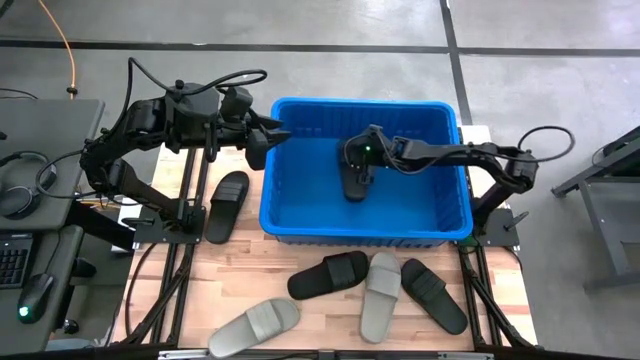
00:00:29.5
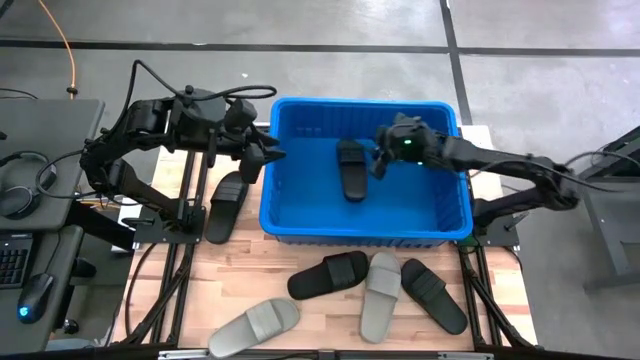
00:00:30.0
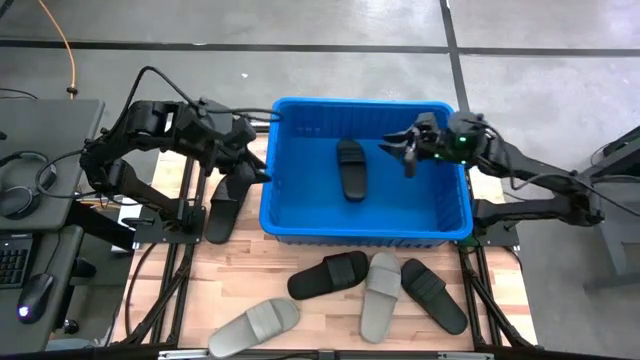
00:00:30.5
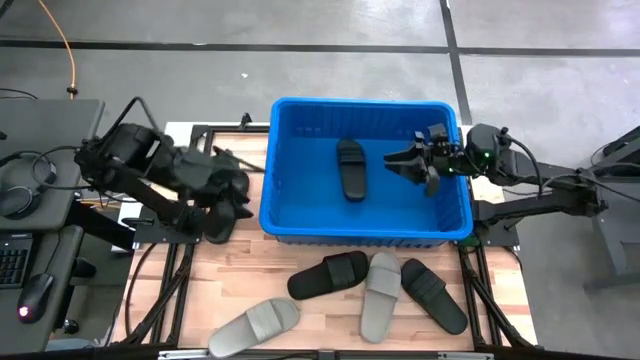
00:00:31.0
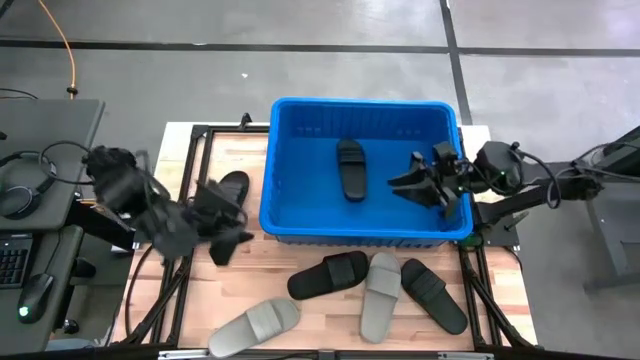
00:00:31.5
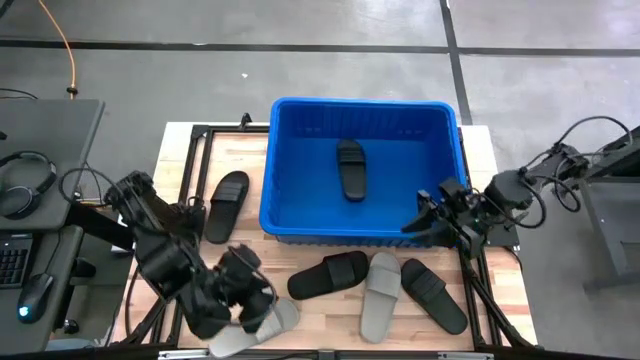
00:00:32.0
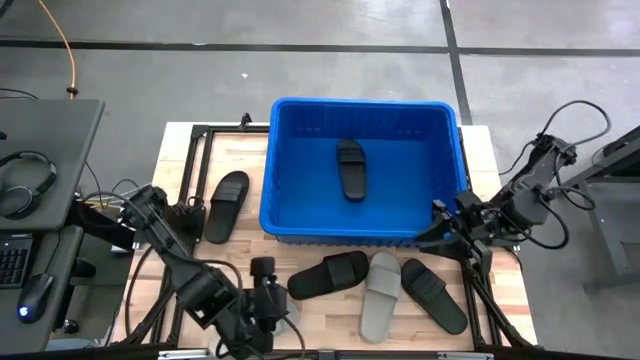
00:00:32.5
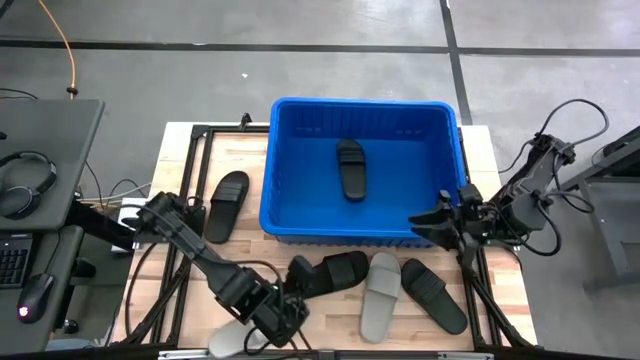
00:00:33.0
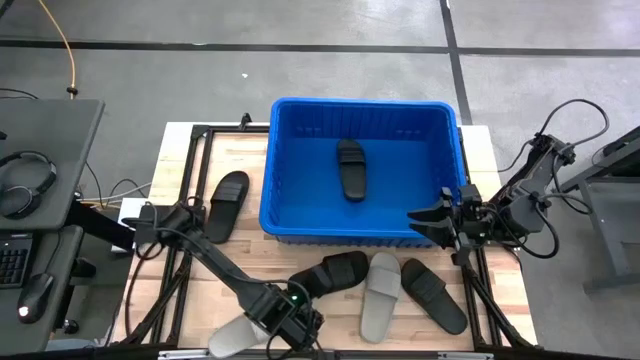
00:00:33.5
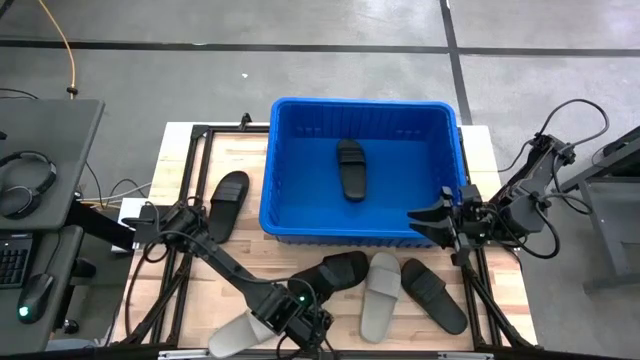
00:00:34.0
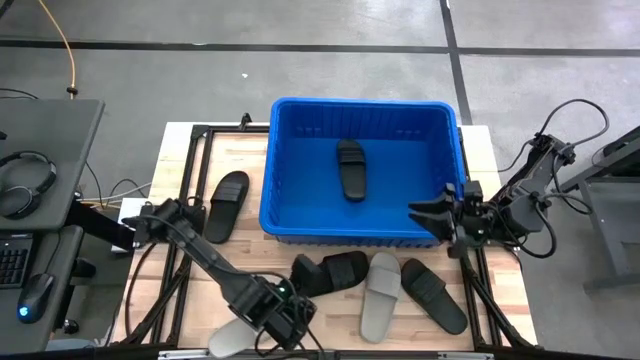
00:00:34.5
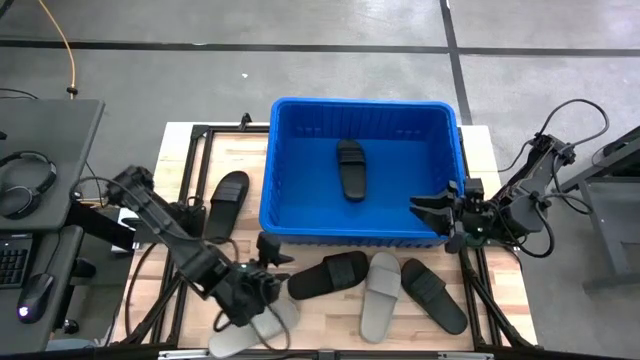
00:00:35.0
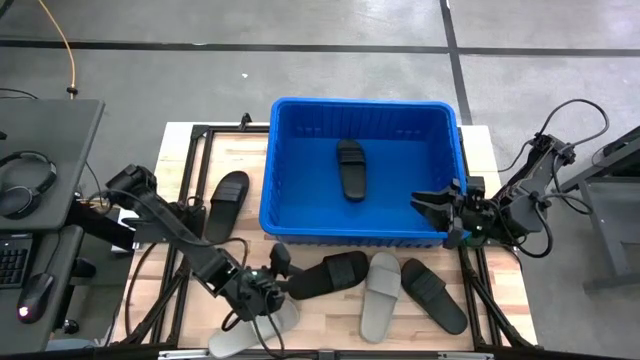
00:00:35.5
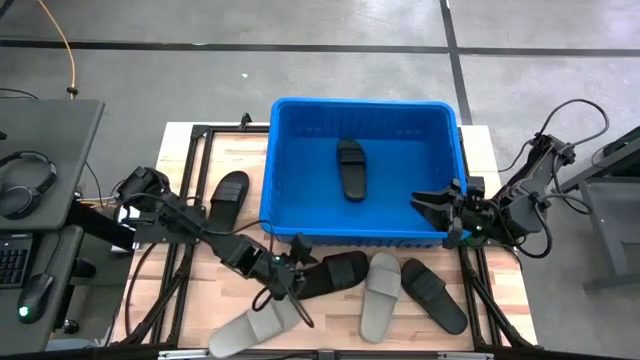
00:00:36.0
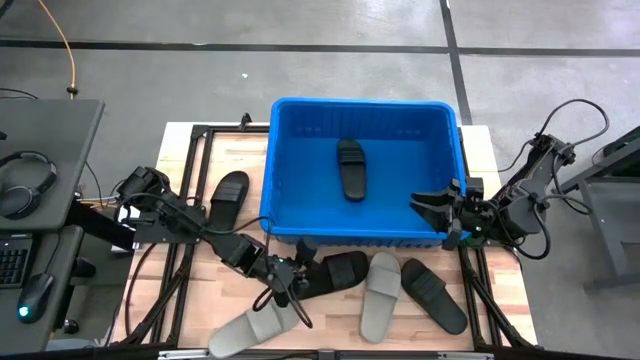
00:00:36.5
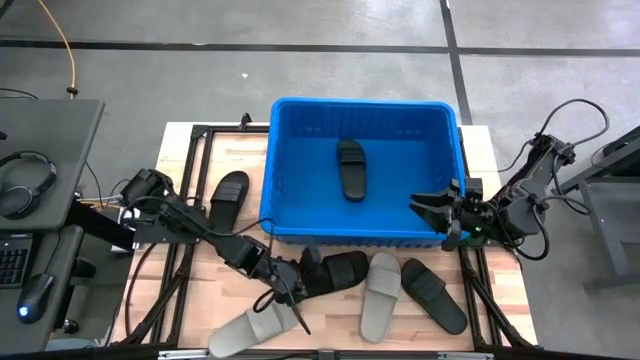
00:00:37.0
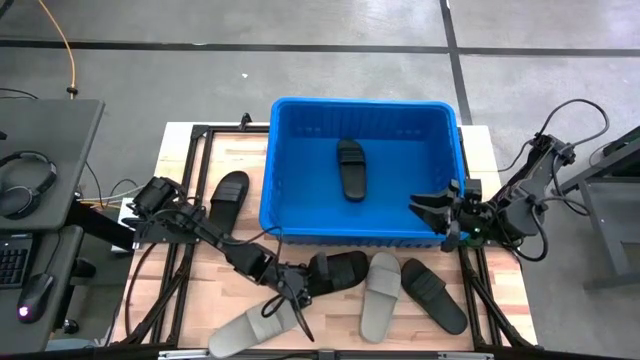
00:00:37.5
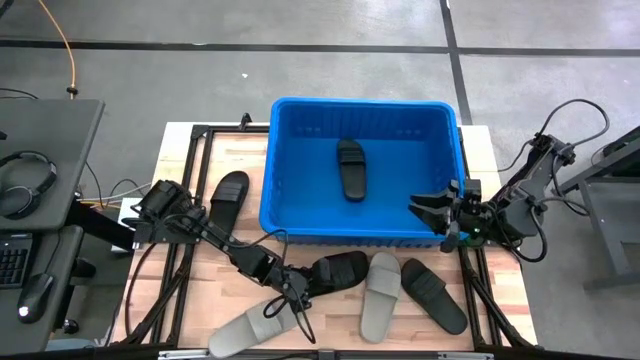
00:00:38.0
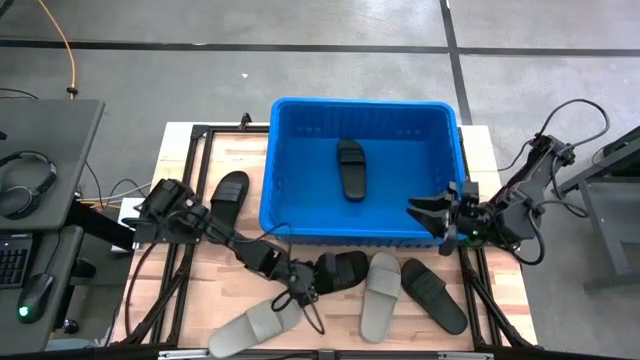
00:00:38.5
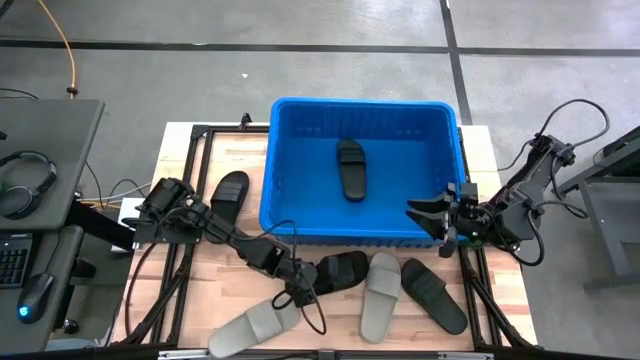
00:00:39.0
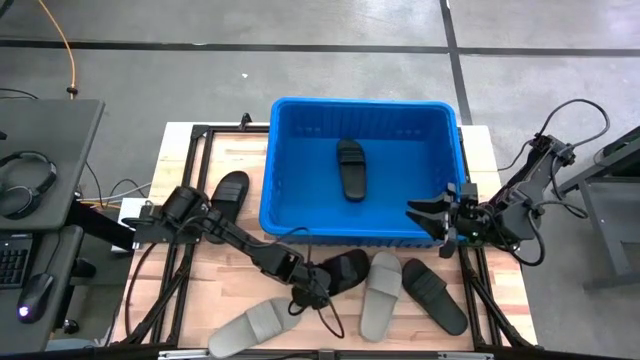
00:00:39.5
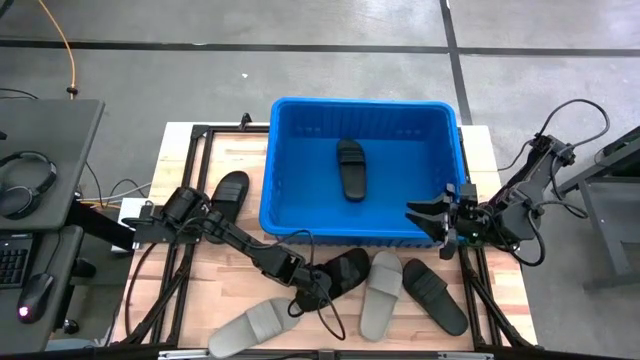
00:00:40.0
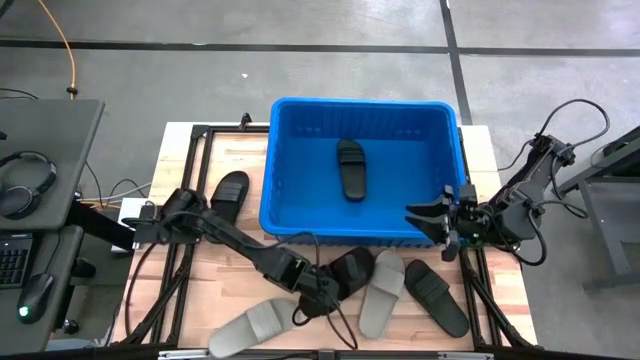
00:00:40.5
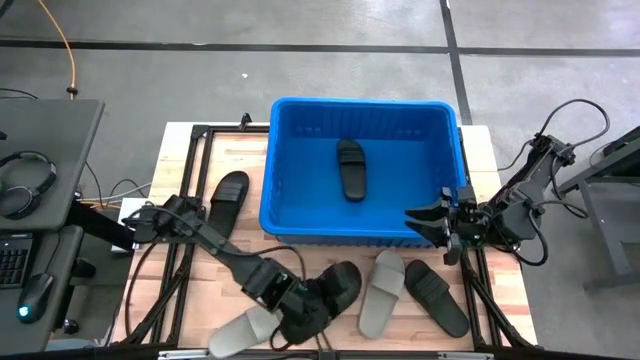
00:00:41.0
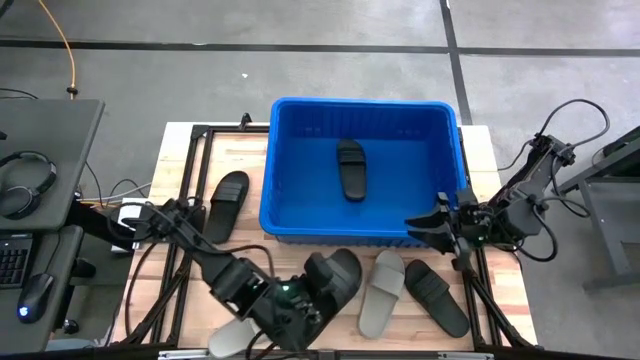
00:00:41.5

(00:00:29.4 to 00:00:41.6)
Task: Pick and place slides into bin
Put the black slides on top of the black slides into the blue bin

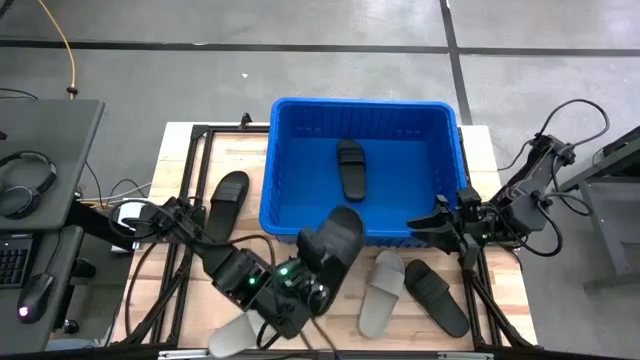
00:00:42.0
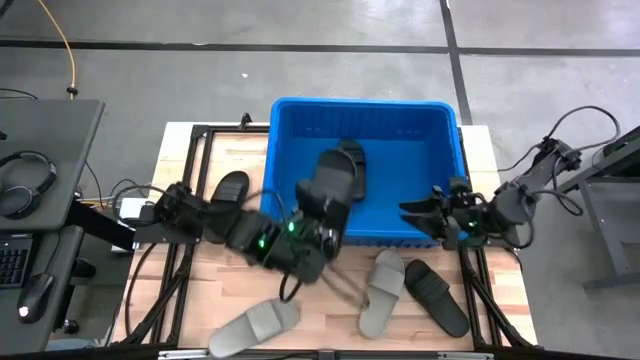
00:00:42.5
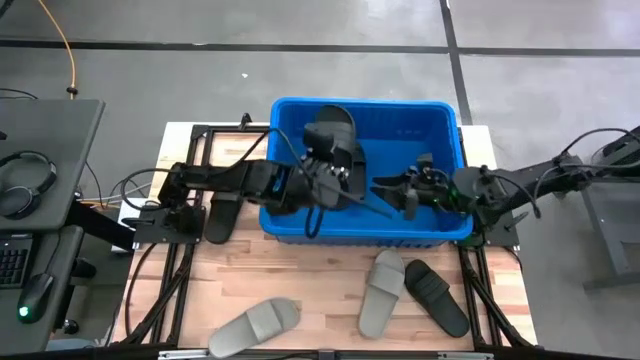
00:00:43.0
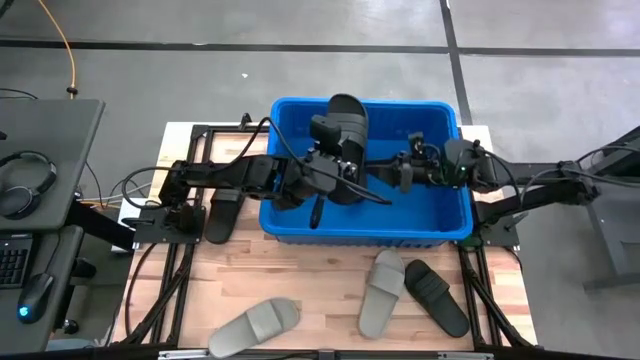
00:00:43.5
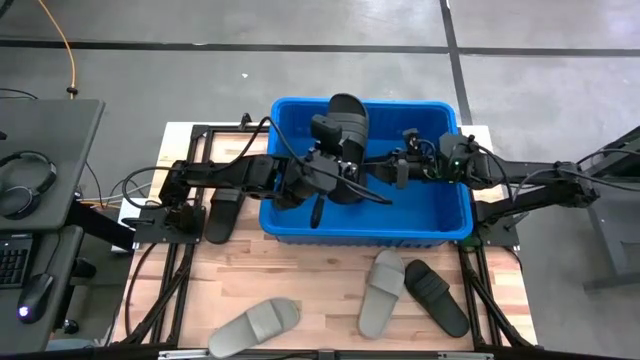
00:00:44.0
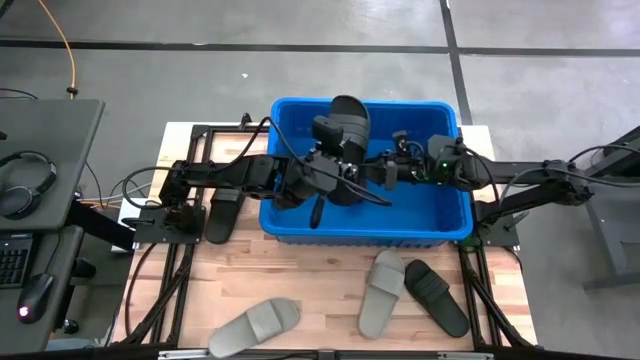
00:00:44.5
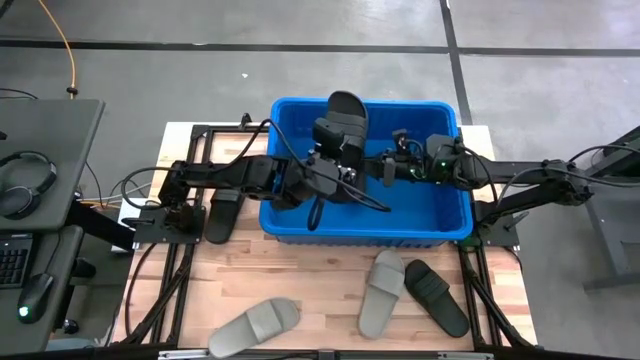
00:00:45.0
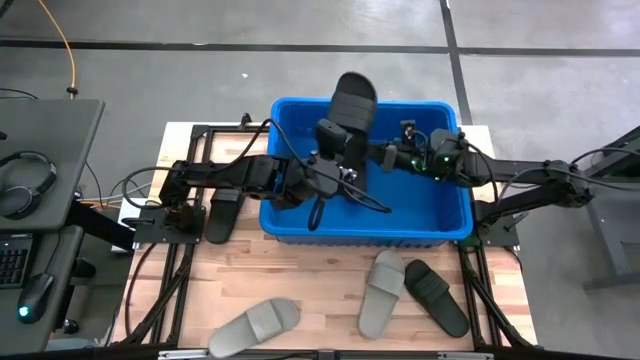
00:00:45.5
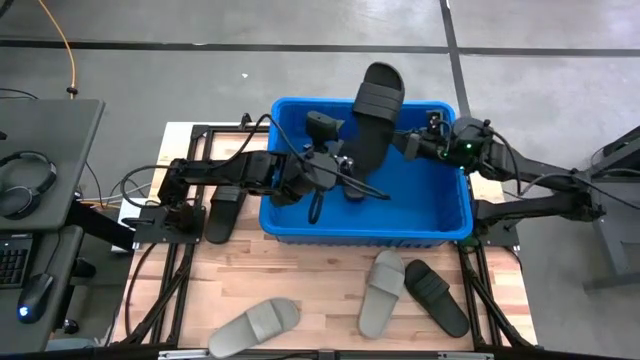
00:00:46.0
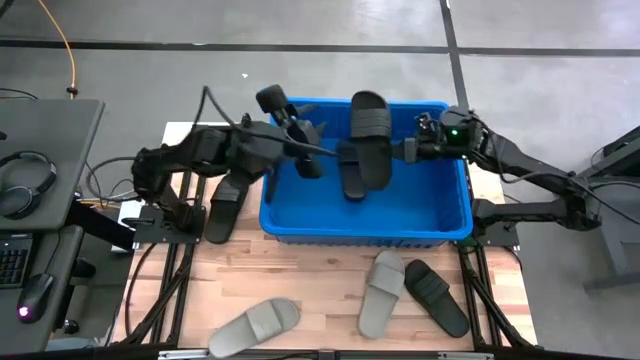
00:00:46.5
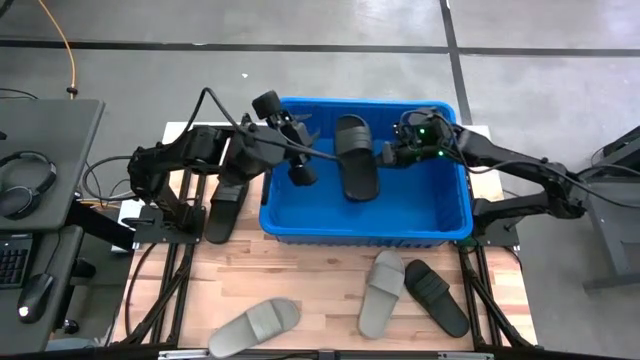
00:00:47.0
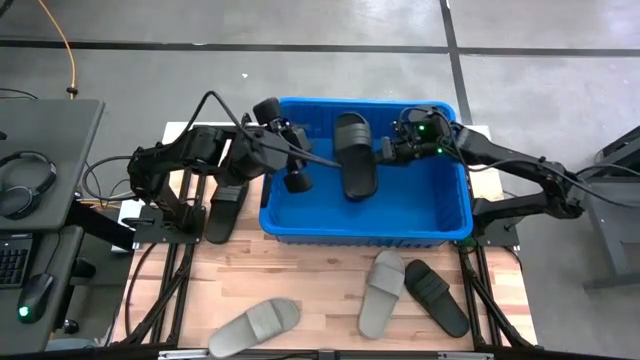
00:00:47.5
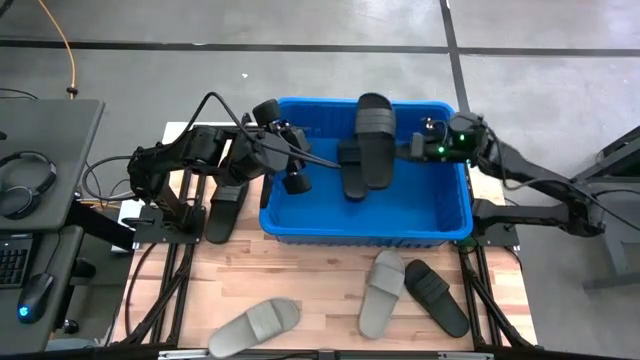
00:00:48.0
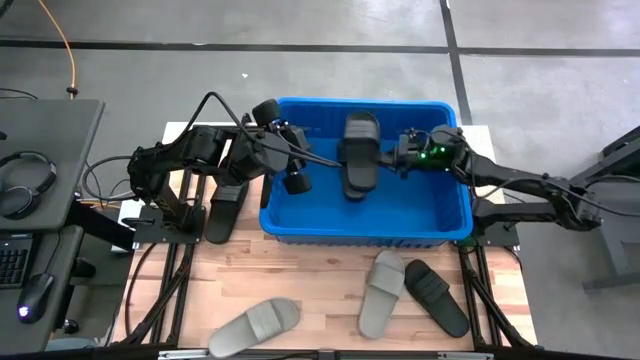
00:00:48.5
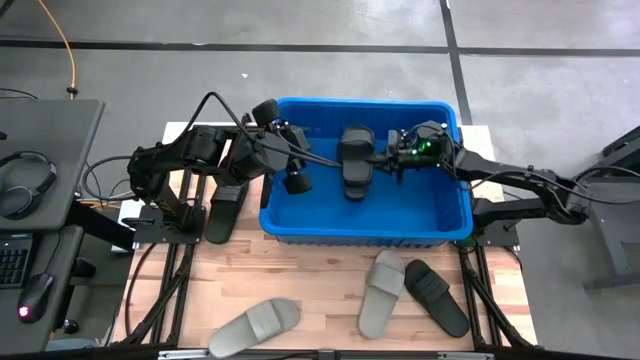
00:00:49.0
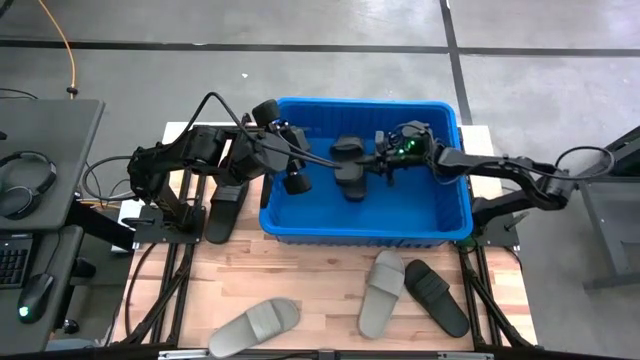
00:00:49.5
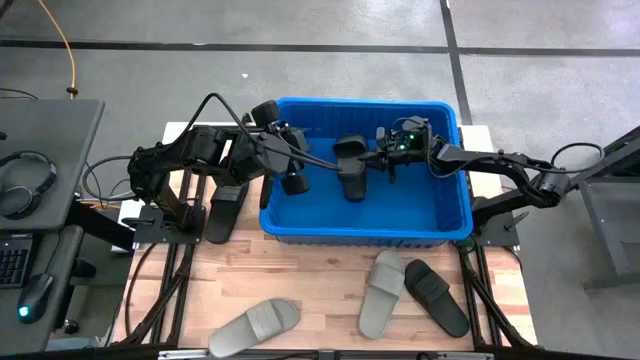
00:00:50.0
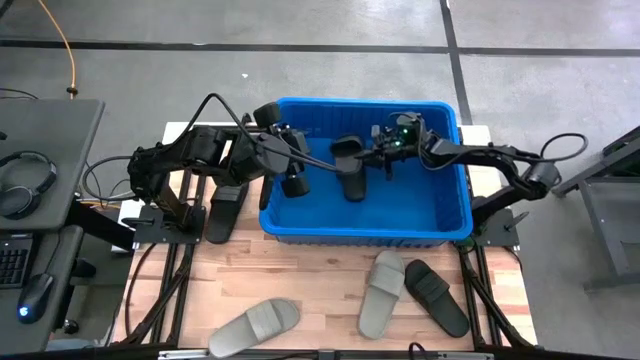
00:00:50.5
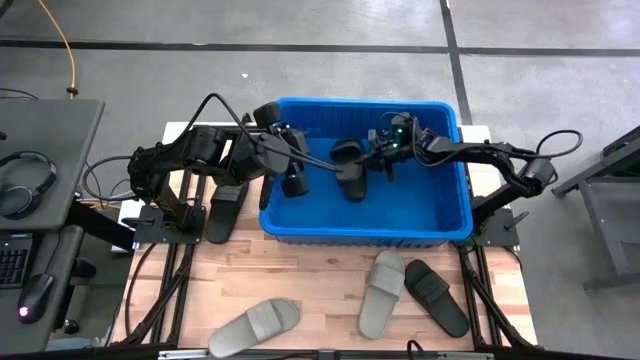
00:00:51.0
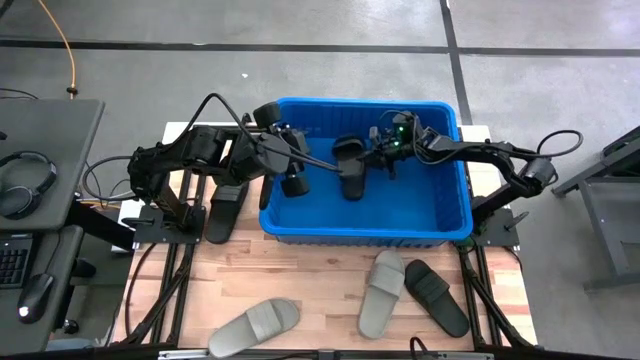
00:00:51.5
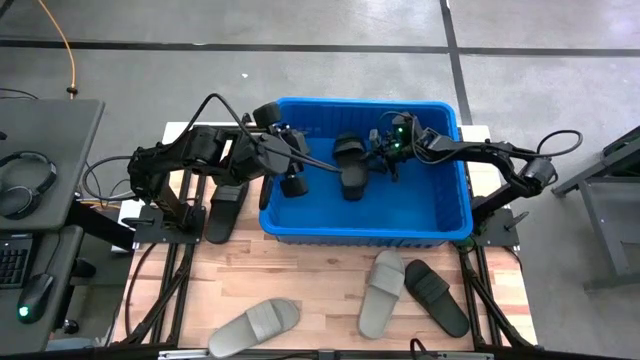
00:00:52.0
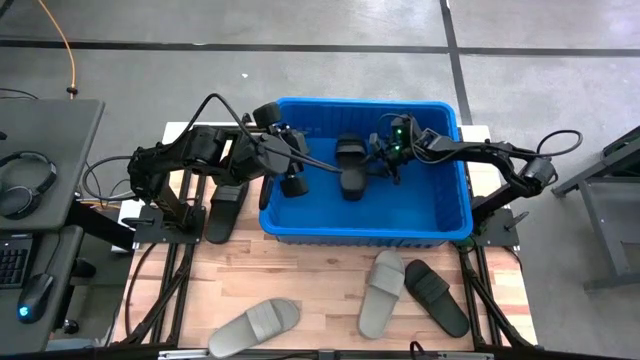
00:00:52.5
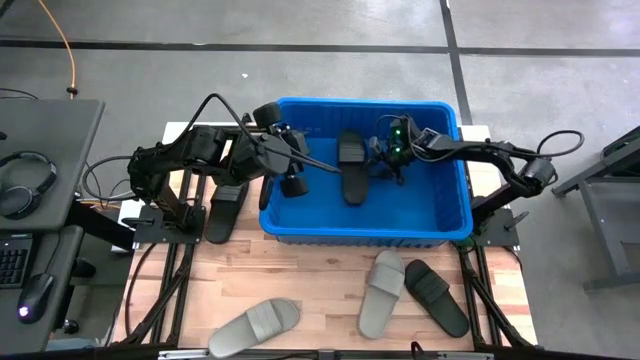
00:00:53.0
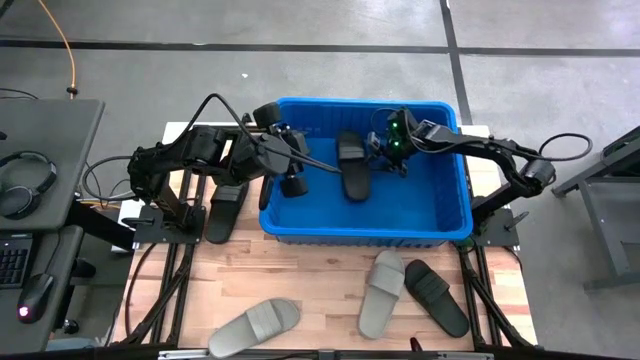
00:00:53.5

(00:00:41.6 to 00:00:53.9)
Put the black slides on top of the black slides into the blue bin
